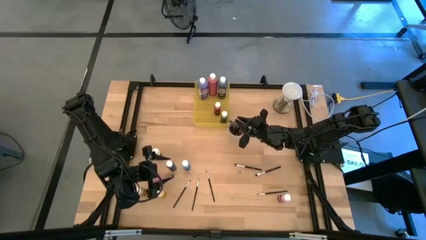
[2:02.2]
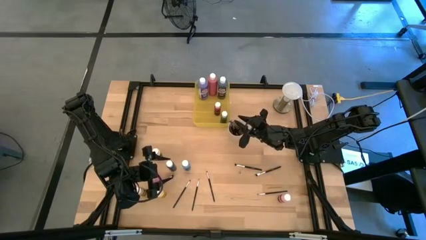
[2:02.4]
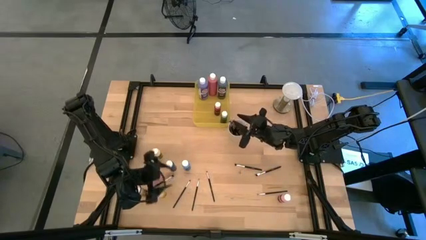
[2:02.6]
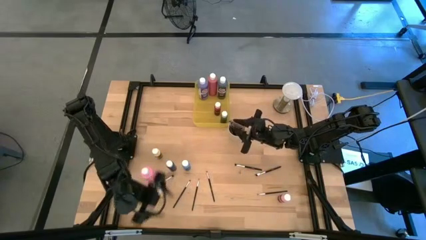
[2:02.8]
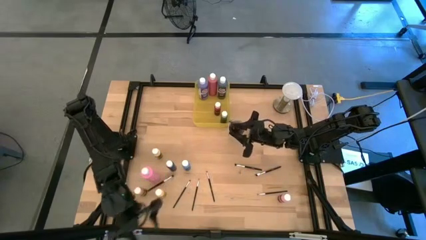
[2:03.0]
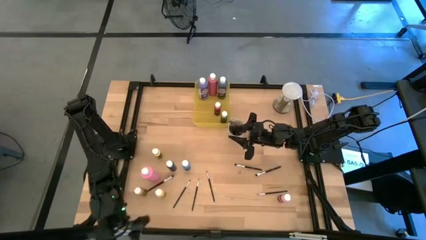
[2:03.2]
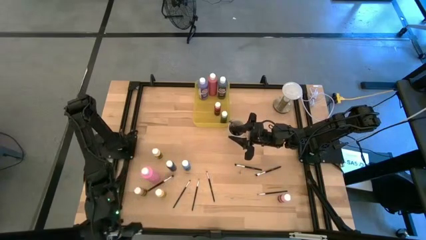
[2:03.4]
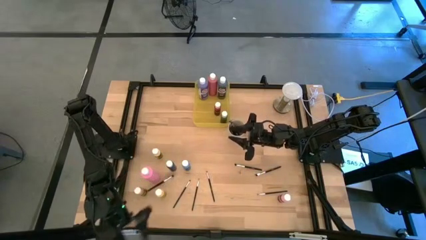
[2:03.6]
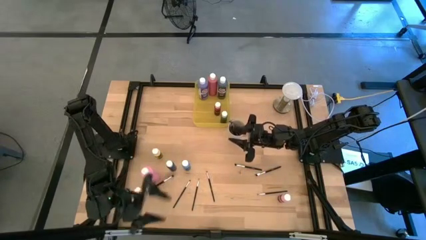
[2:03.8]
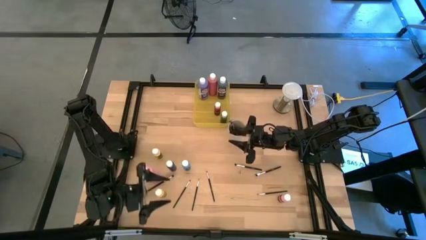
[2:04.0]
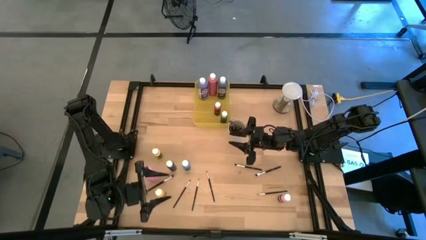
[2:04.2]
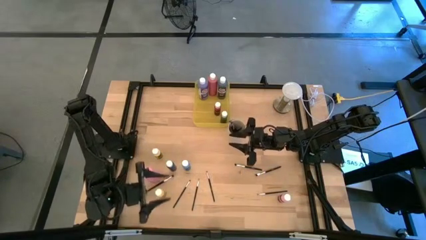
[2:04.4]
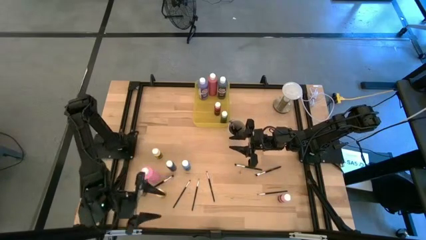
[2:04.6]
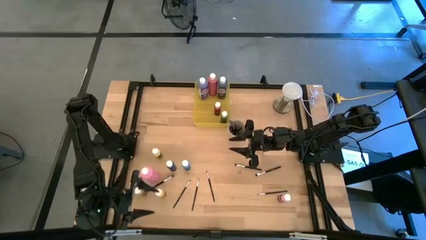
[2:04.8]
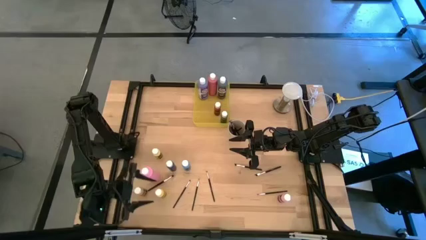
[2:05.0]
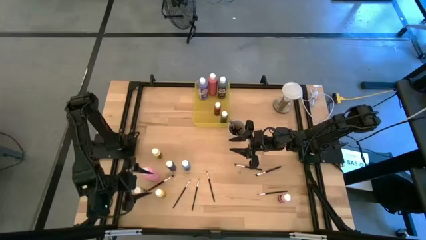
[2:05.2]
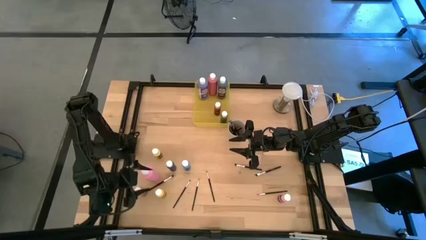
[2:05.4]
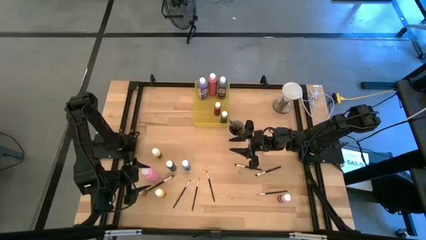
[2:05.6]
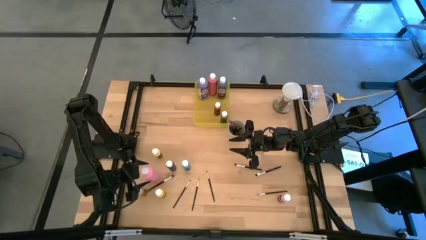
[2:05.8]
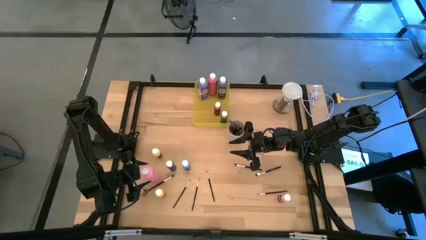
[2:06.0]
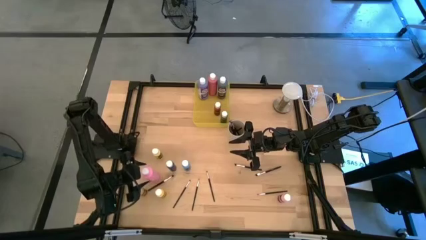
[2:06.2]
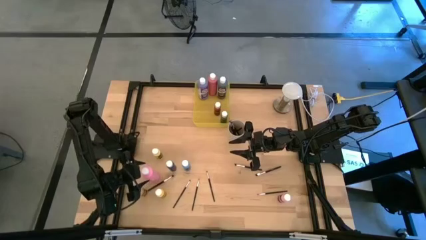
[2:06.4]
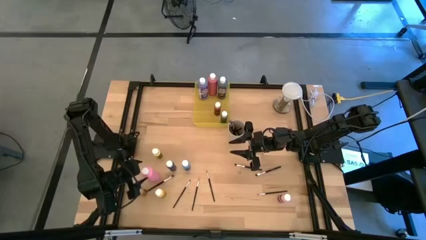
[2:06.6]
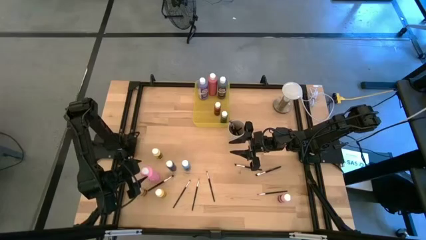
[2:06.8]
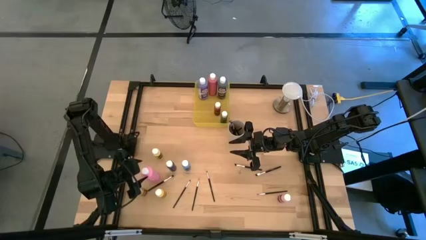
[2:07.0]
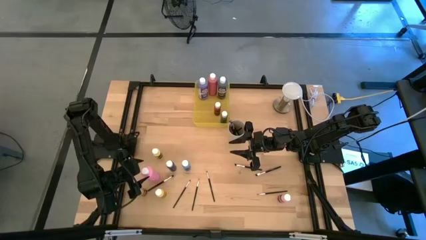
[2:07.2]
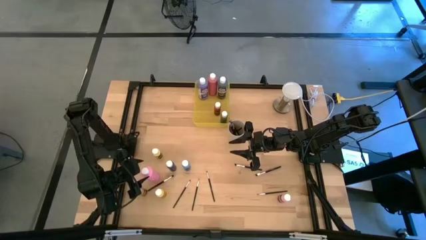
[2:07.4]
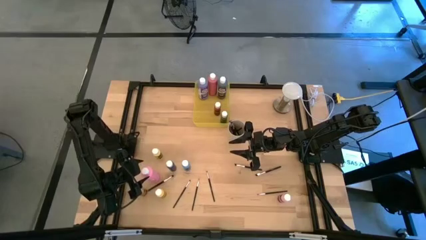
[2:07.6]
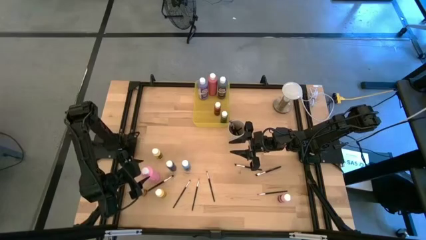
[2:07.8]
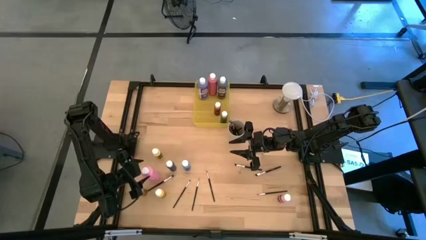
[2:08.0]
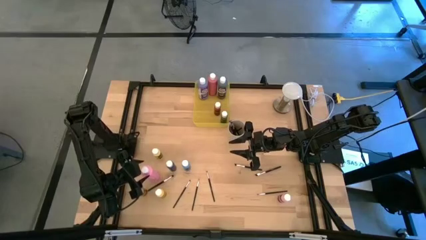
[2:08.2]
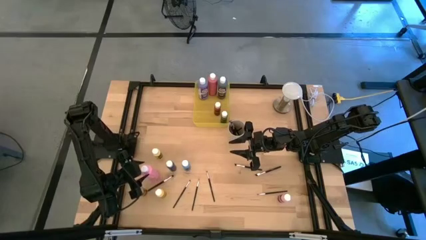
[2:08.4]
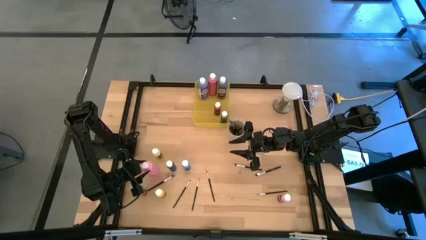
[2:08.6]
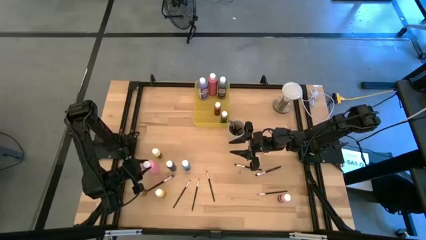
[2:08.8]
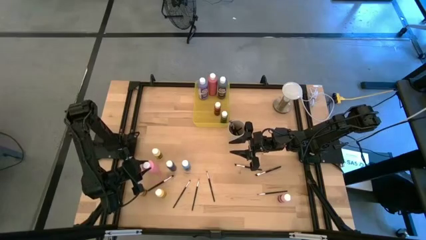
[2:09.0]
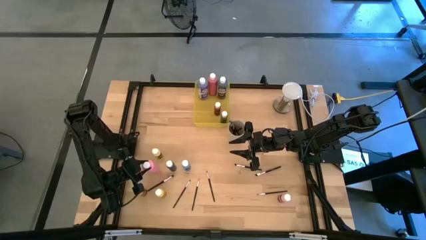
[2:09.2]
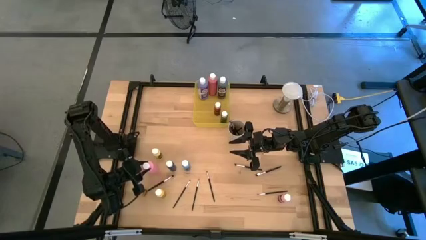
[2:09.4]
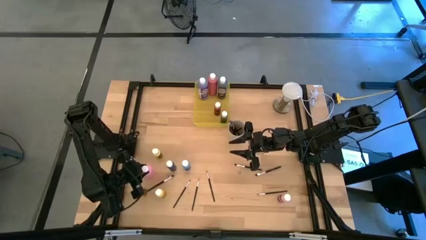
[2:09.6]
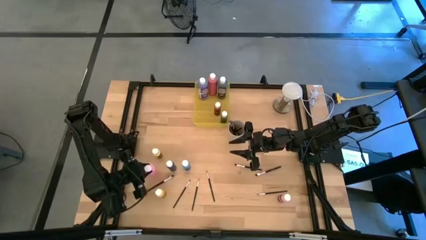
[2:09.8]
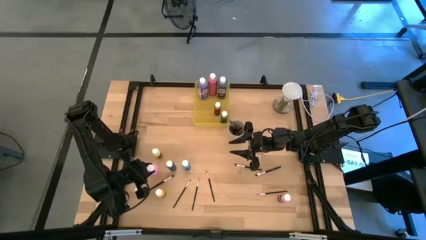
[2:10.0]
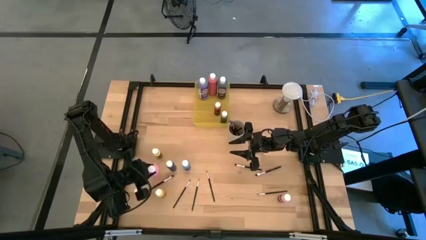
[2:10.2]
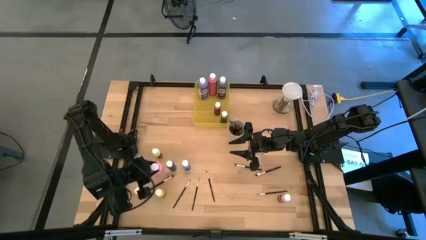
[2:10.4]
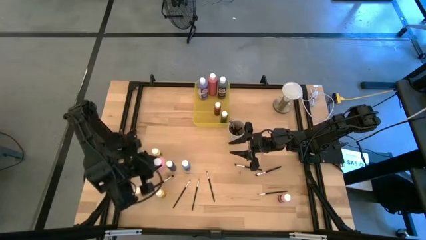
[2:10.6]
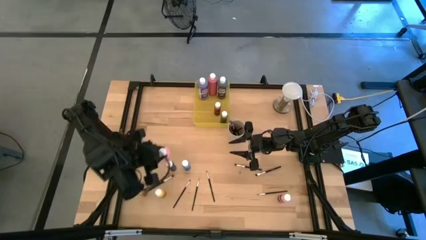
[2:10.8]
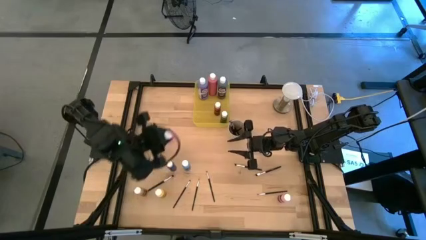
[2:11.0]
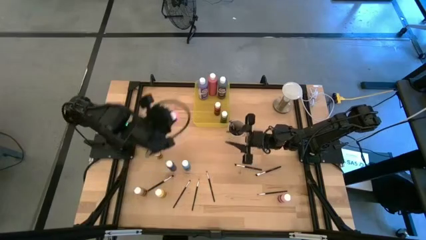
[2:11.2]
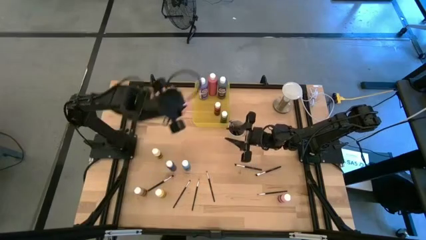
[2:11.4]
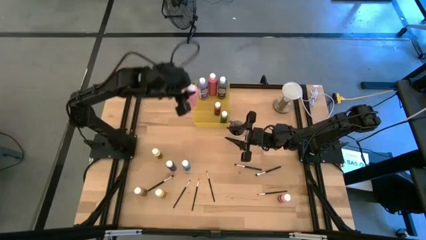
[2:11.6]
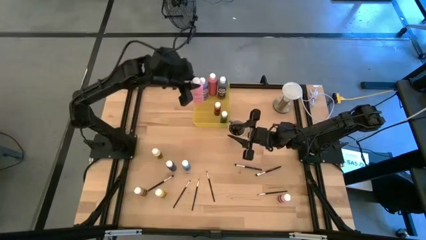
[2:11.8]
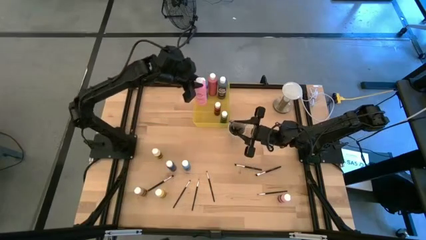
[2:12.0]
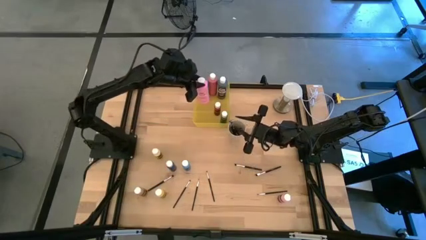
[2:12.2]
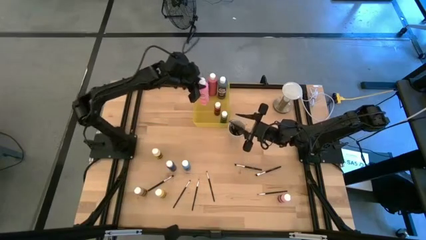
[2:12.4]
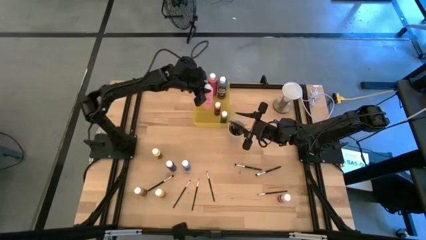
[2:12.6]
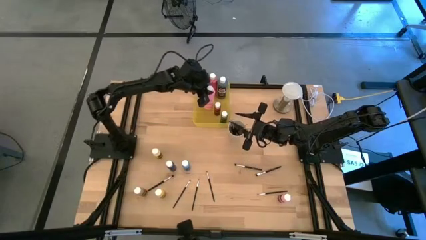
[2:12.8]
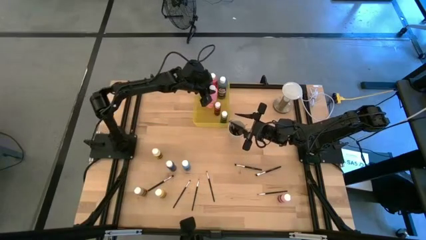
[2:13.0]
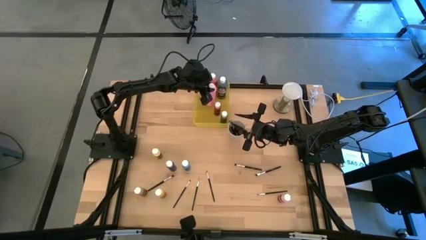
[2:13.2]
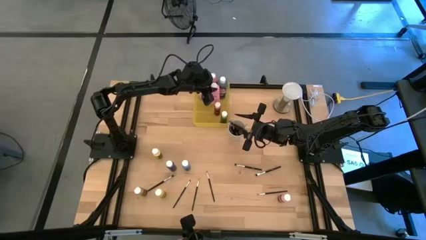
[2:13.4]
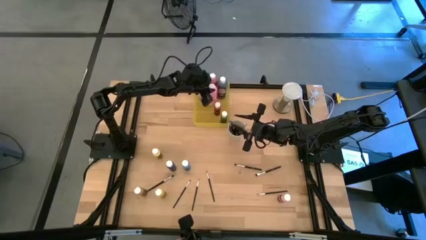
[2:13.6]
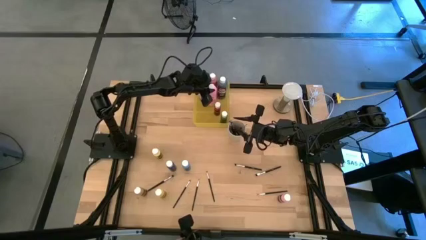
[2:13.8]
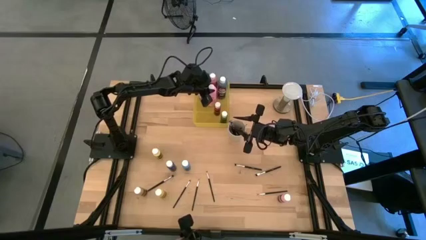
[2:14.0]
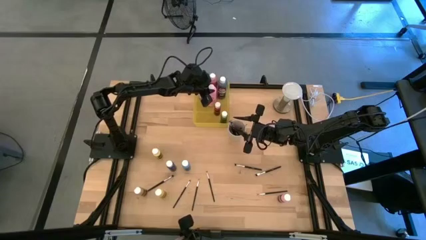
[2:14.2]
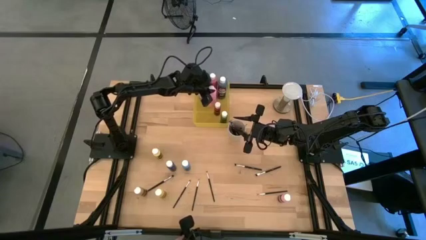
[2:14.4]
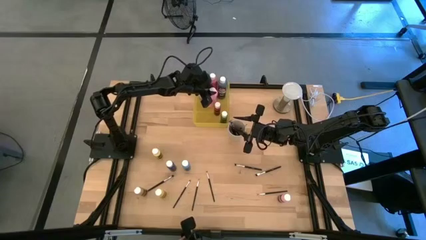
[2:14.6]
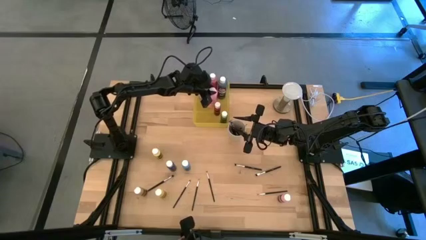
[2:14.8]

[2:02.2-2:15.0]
Task: Pick & Place Paint Supplies
Put the large light pink paint bottle into the yellow bin

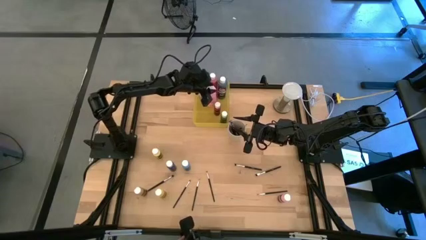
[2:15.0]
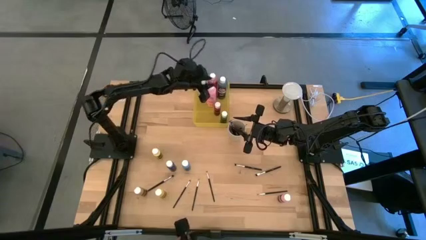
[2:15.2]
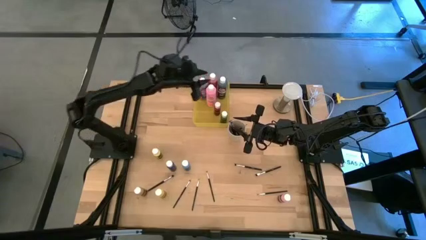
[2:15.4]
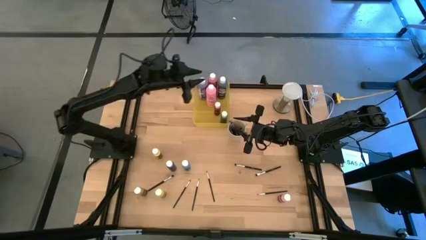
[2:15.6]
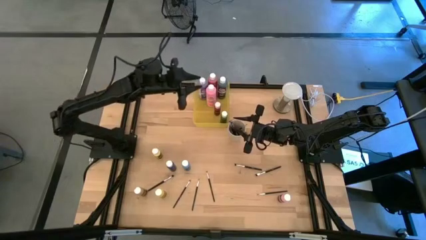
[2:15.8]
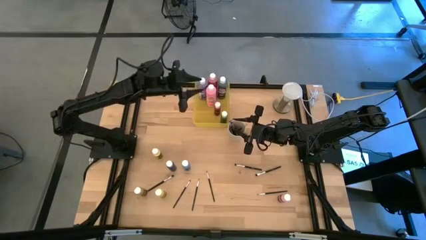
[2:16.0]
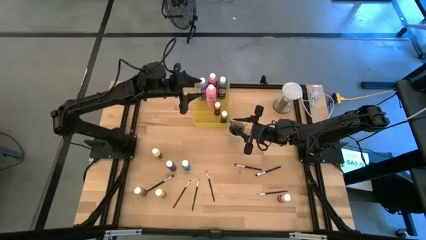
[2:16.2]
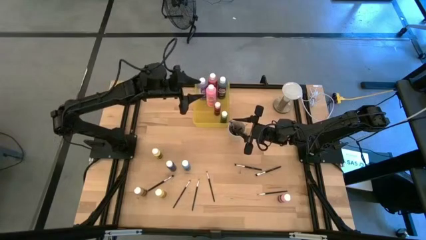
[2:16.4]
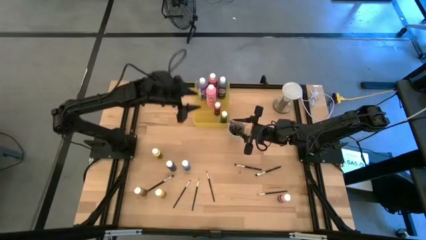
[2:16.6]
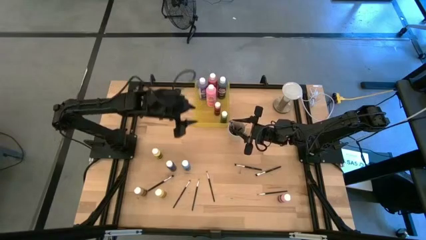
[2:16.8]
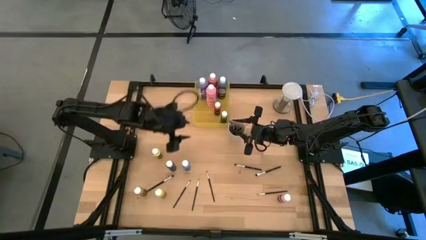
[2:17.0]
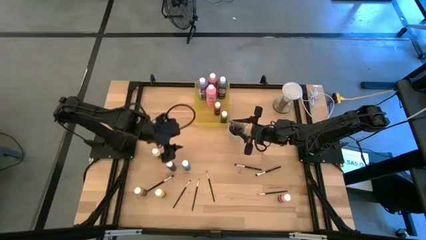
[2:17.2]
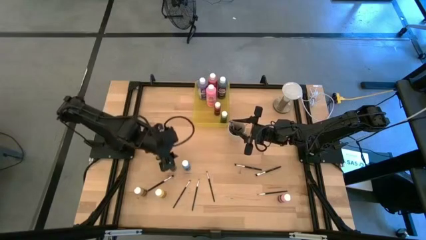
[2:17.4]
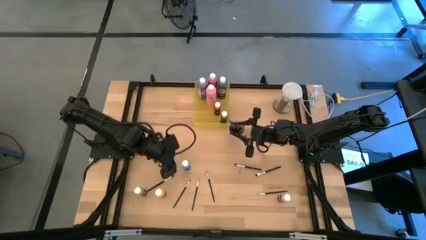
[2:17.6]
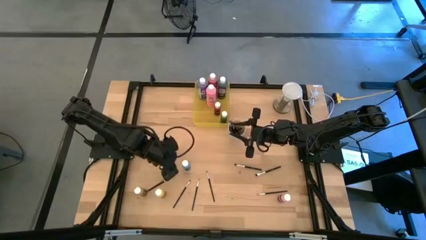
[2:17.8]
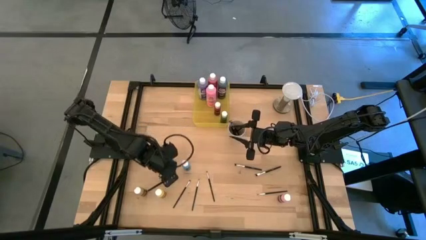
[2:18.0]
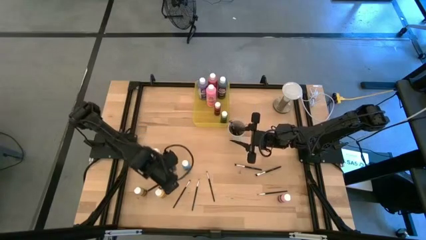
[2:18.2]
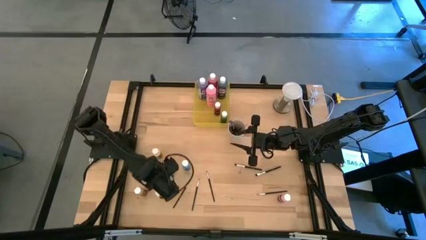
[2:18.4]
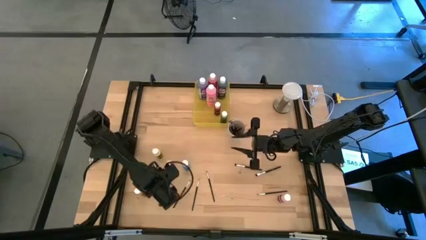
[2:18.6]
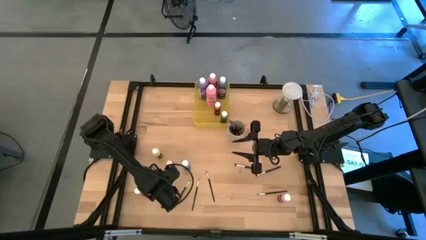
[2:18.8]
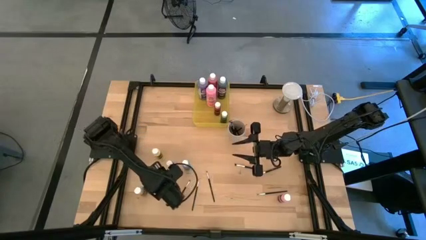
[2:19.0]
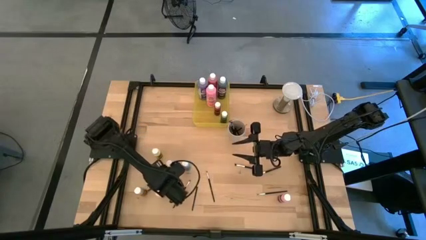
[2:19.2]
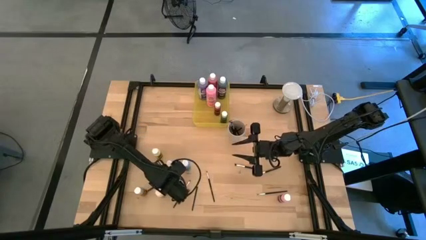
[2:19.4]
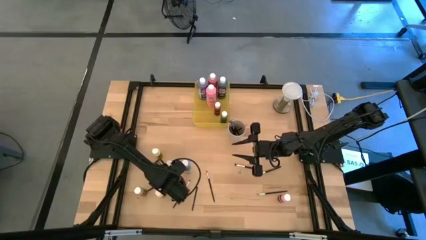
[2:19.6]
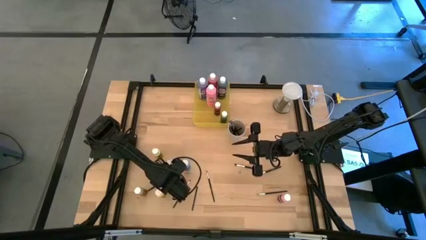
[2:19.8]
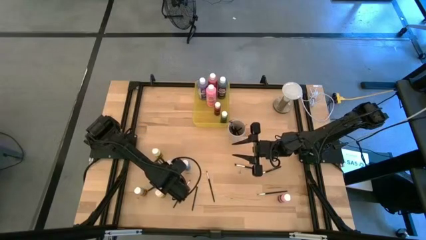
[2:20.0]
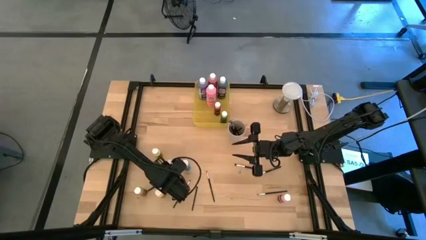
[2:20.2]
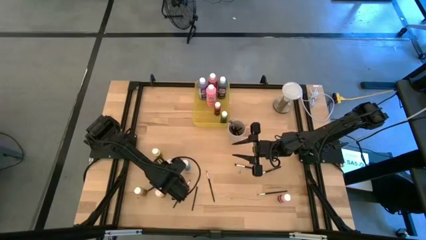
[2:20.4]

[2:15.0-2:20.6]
Adjust the small blue paint bottle
